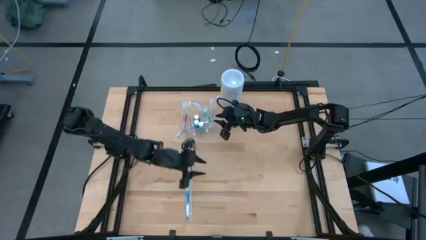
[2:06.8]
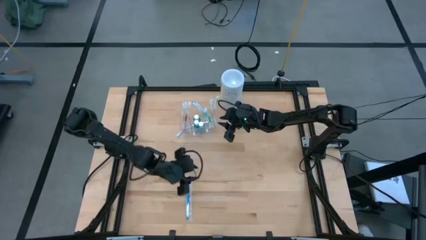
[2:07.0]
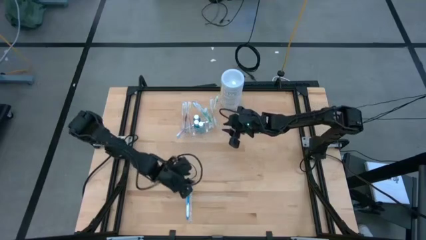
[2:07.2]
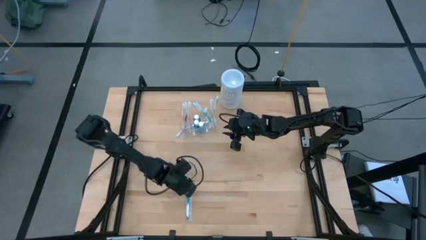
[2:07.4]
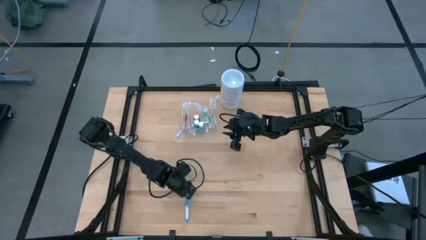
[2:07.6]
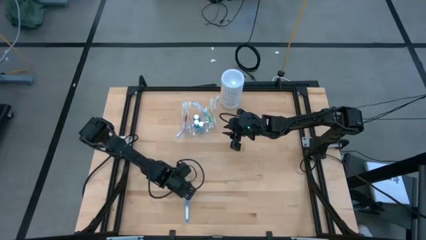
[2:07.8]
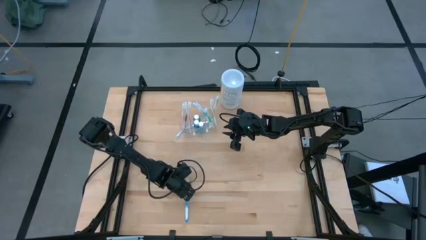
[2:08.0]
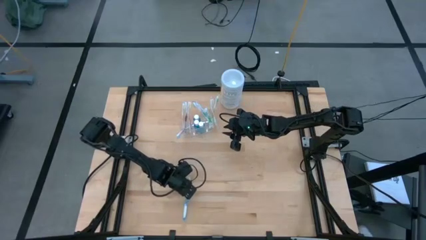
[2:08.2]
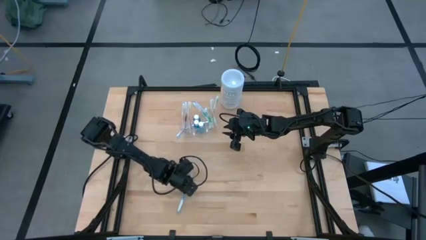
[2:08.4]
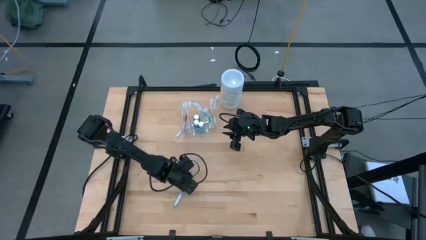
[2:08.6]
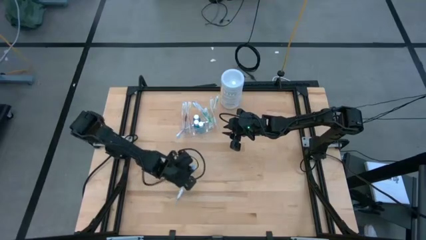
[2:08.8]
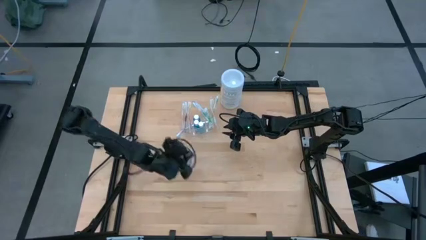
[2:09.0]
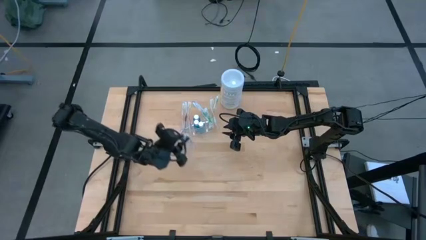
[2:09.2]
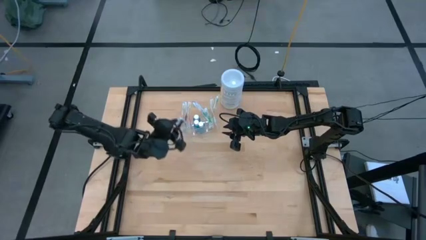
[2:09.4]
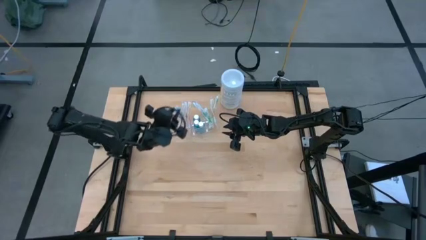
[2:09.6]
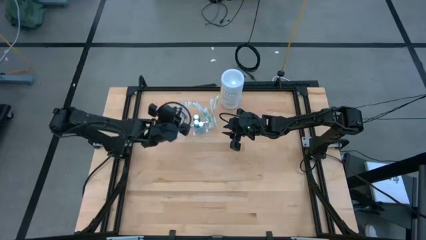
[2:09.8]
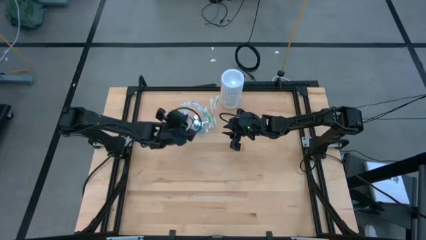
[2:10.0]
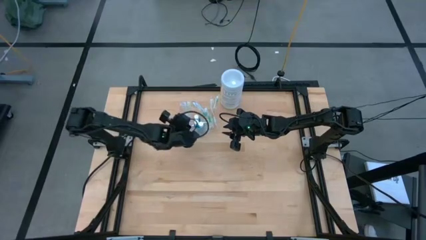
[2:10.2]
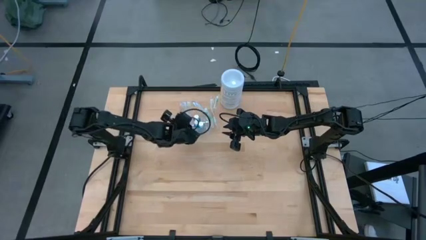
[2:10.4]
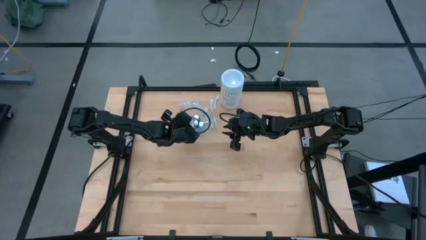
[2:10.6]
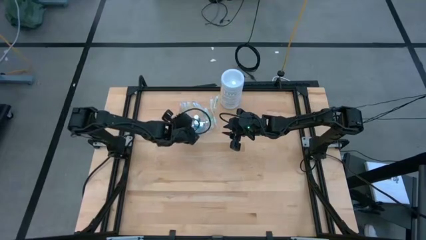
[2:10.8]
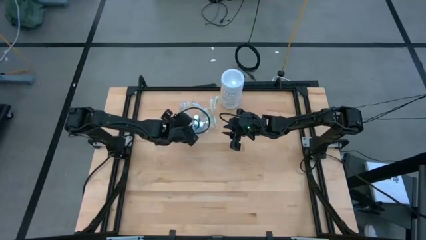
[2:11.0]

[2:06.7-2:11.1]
Task: Pick & Place toothbrushing station
Put the blue toothbrush into the transparent organizer

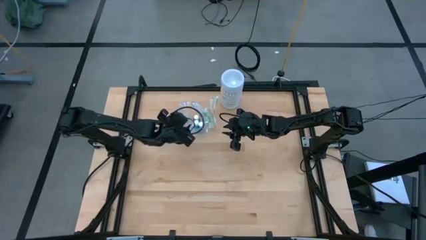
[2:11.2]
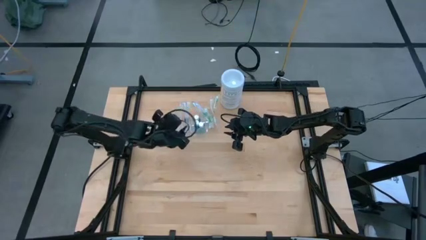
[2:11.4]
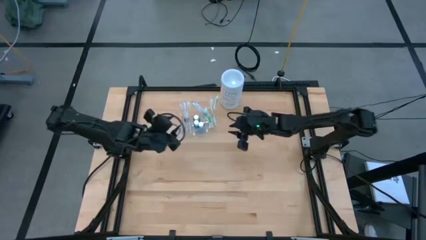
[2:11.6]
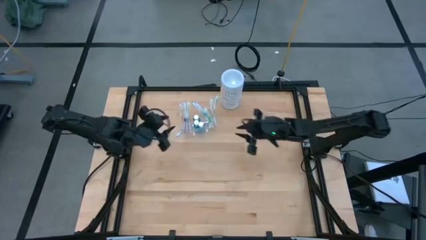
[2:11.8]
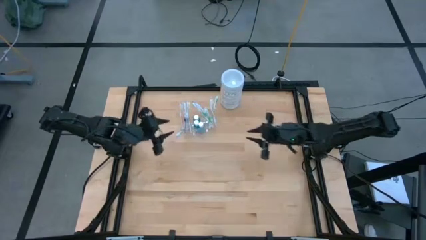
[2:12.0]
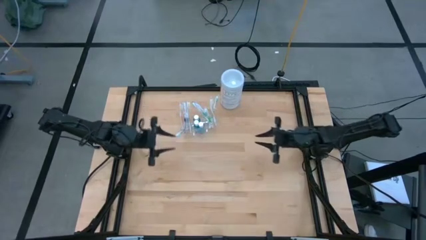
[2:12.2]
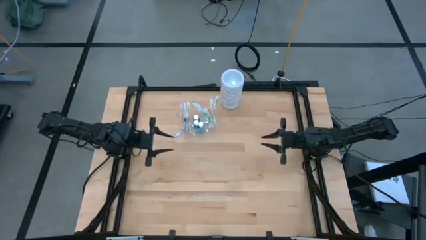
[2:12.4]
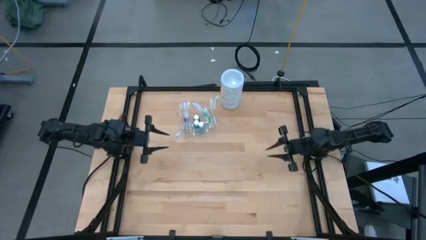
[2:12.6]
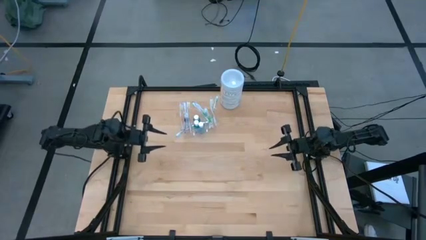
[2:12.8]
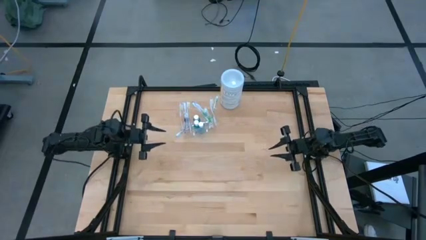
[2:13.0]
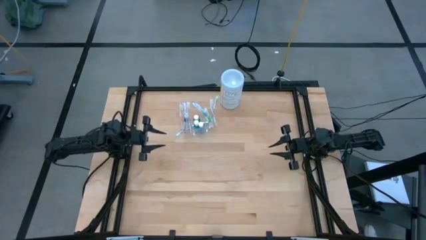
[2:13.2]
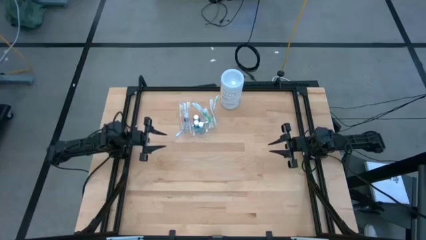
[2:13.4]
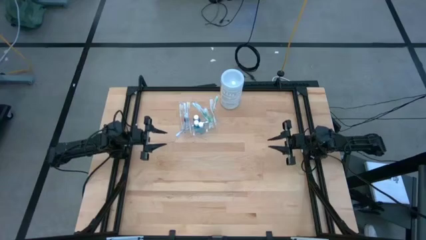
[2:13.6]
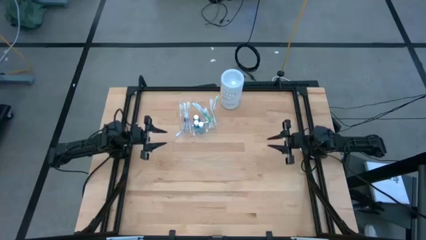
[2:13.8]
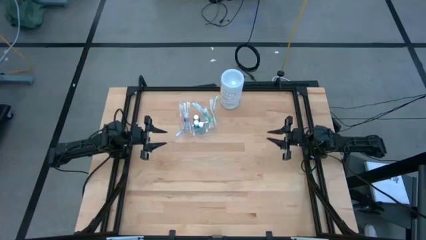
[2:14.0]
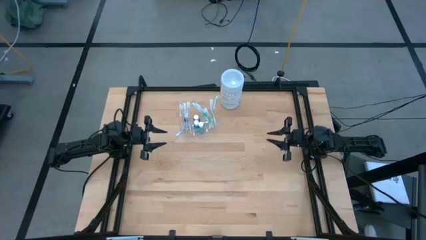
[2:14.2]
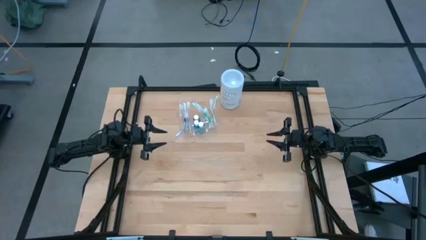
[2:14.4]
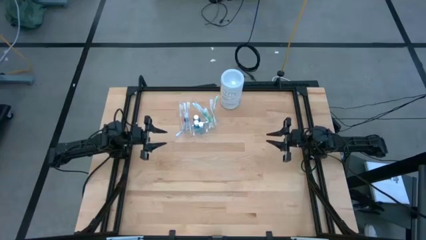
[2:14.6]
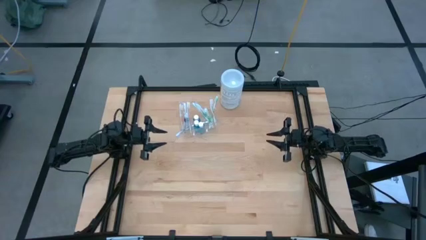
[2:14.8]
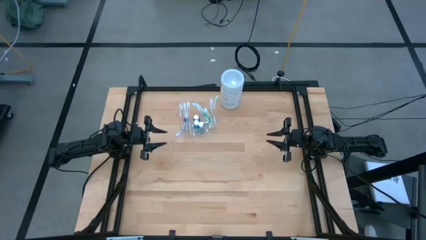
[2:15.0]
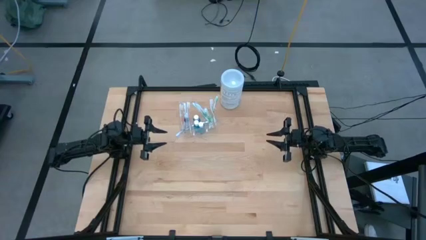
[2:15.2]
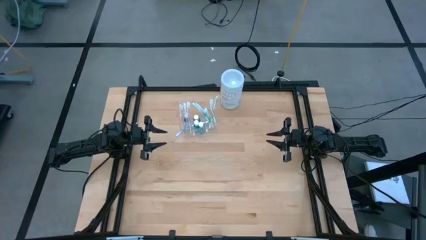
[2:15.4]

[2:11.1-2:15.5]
Return to Home Position

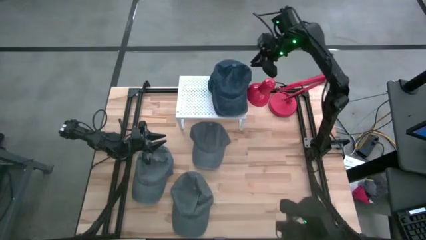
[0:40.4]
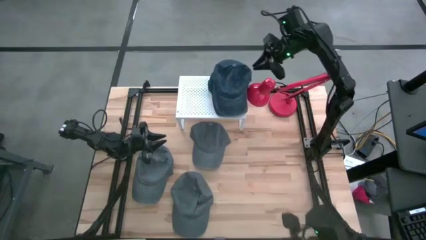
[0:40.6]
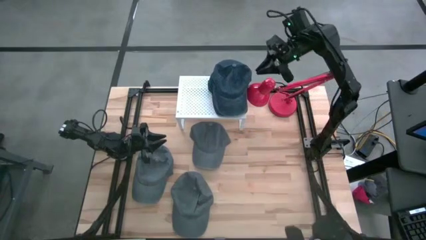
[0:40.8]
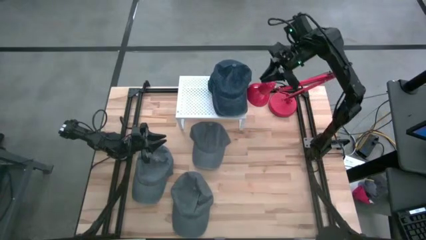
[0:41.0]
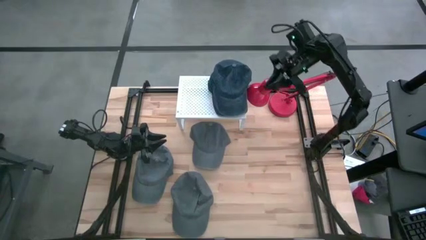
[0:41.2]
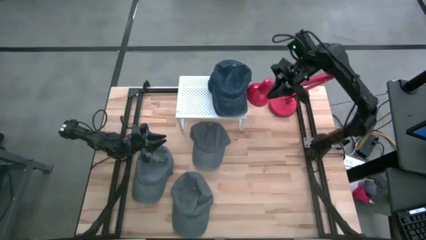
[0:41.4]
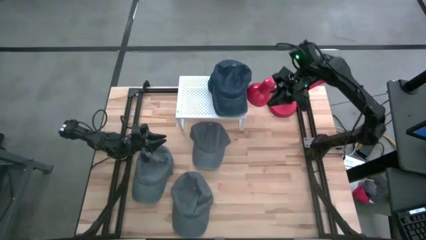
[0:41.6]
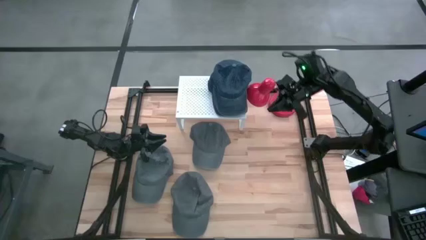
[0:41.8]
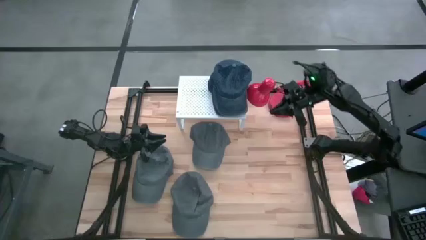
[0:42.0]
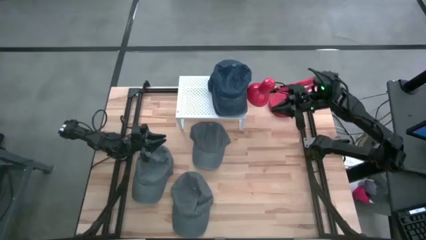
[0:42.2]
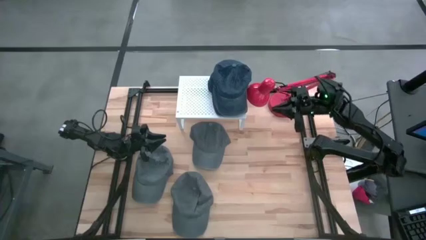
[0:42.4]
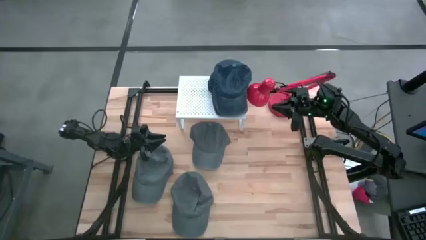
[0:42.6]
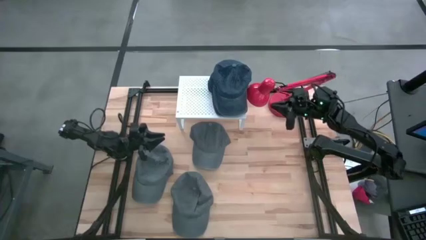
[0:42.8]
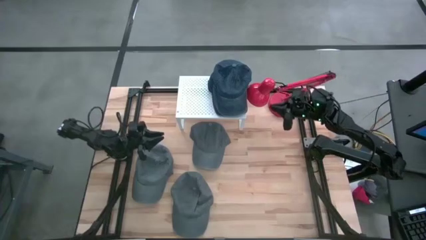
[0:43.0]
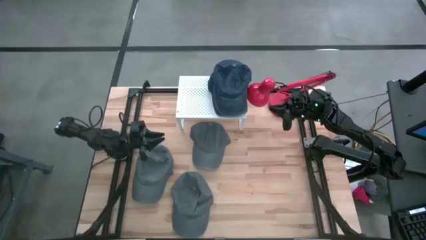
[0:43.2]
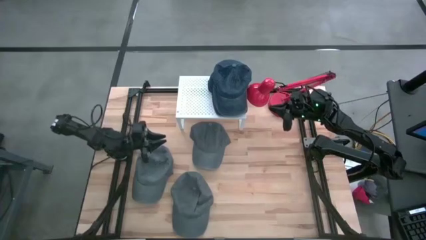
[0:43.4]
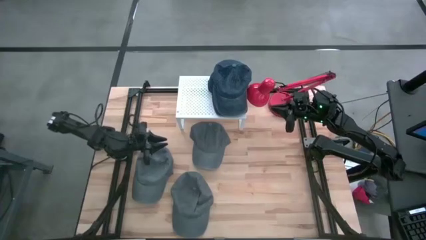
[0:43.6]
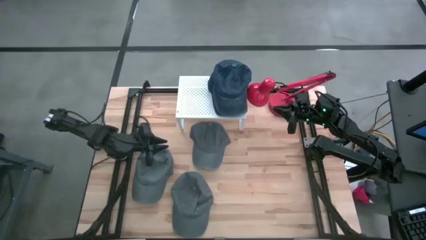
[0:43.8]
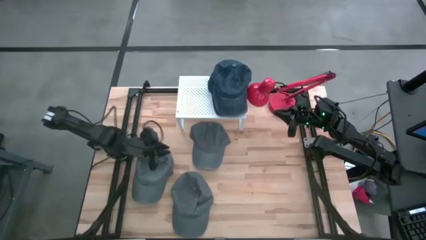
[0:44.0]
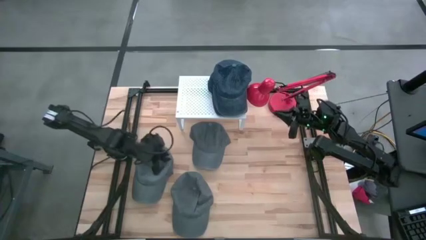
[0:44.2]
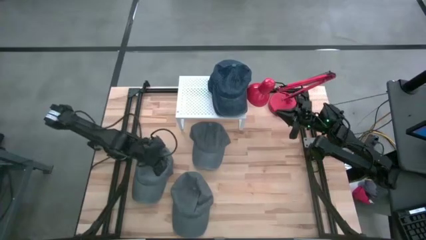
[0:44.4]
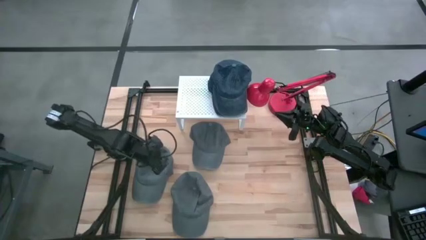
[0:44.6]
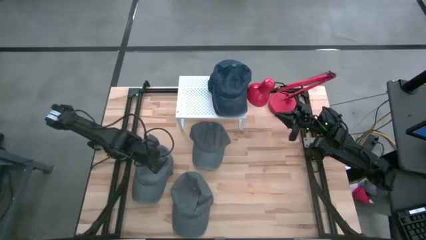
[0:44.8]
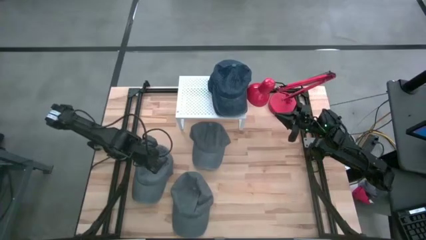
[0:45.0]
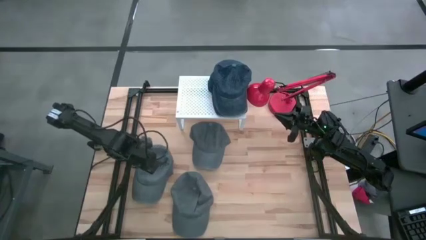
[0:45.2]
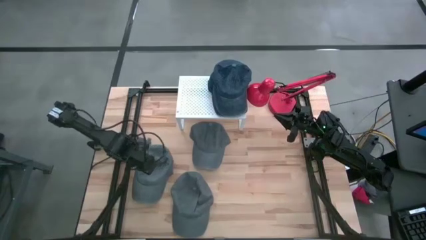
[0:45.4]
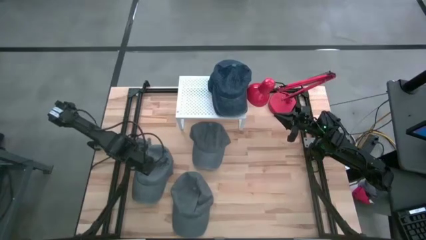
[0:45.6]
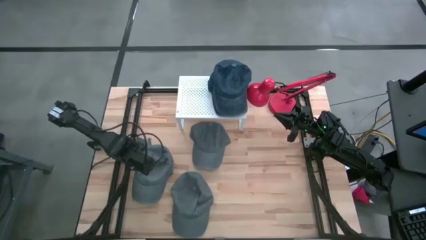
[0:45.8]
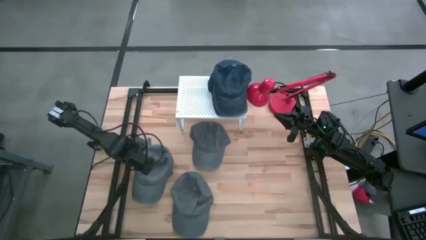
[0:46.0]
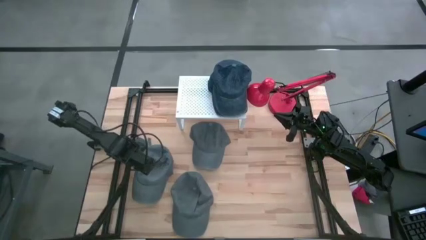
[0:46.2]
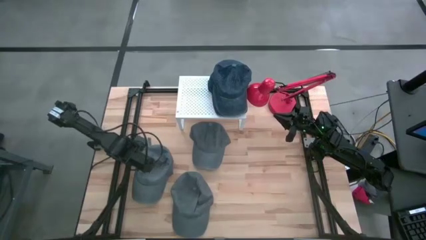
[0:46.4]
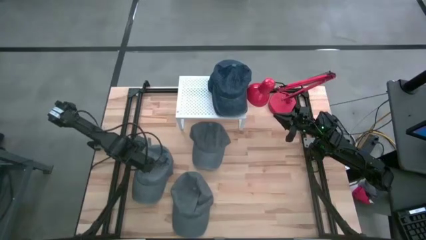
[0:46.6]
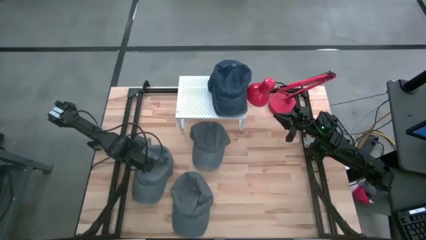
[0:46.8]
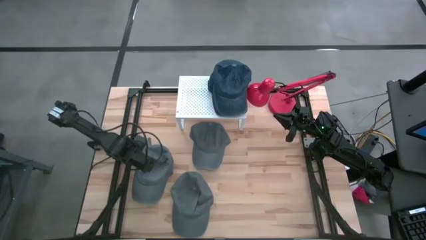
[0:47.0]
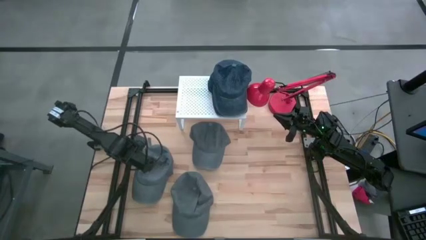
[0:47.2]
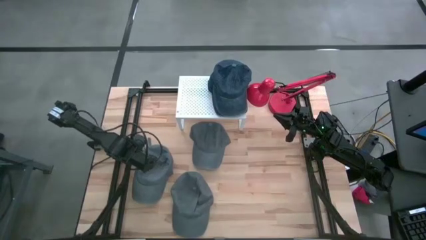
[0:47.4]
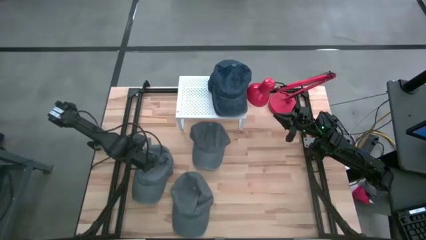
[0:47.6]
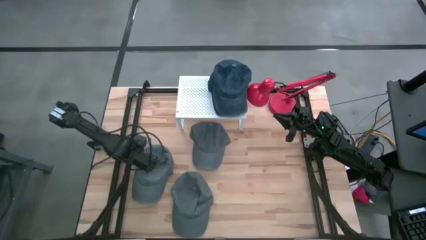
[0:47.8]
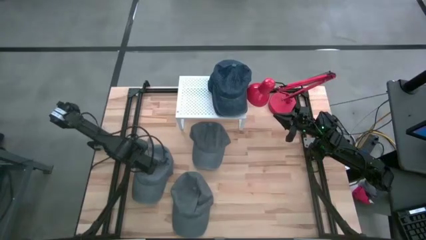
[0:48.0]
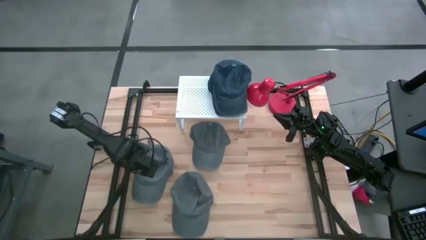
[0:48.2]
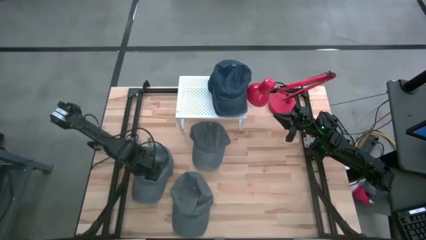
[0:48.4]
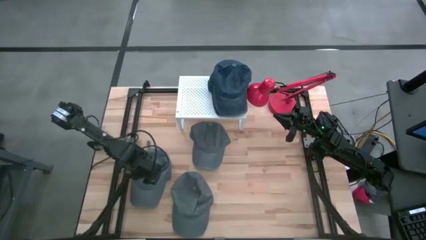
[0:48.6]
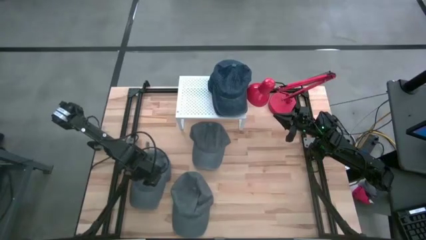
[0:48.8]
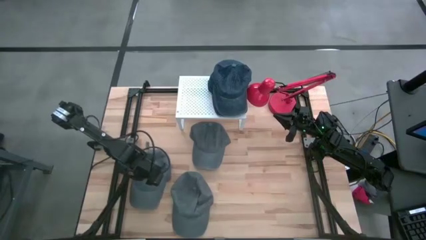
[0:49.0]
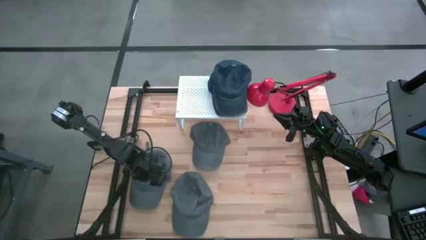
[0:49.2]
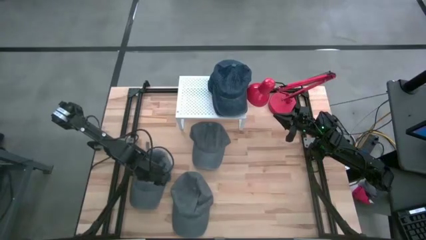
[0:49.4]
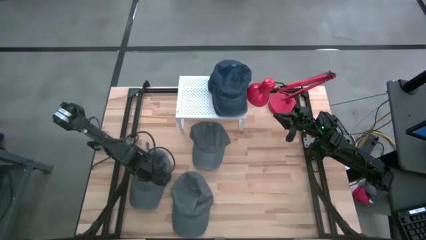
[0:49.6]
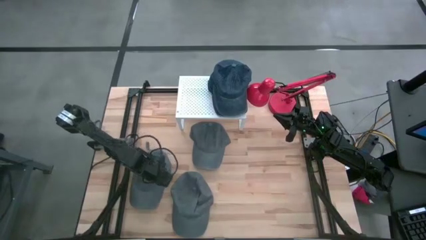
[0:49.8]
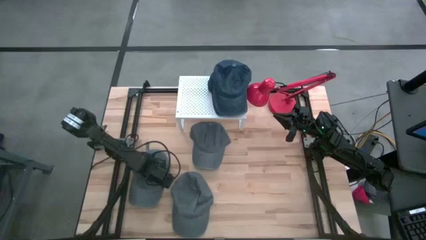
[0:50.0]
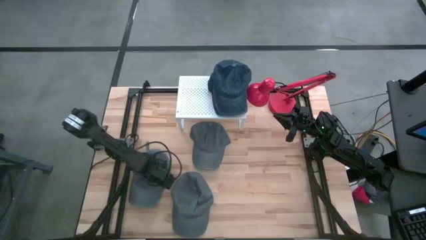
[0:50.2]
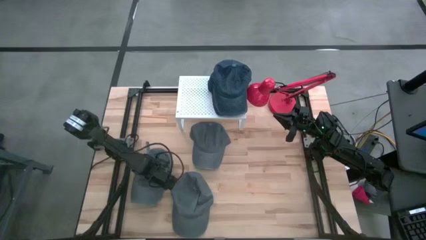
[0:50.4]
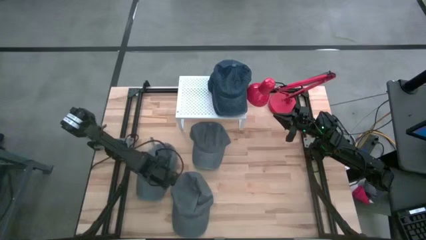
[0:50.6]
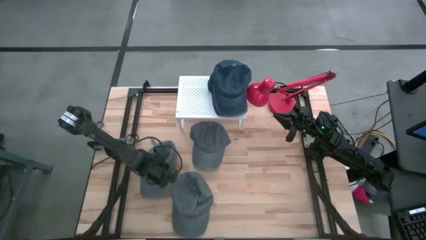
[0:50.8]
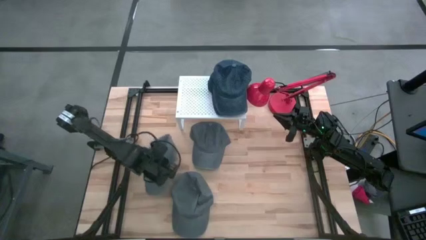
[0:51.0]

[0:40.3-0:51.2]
Task: Pick & Place hat
Put the middle left gray cap on the shelf
